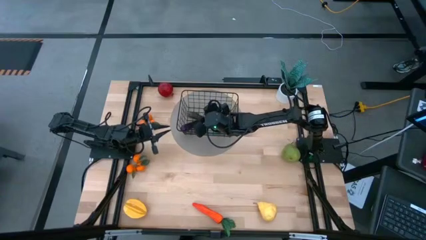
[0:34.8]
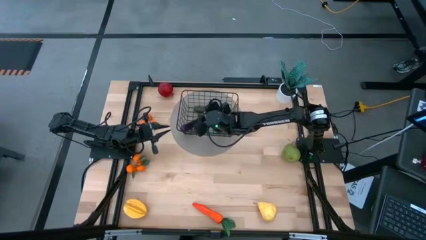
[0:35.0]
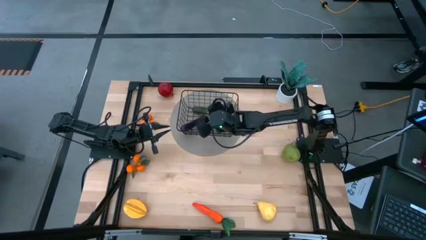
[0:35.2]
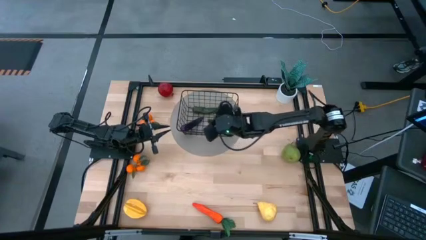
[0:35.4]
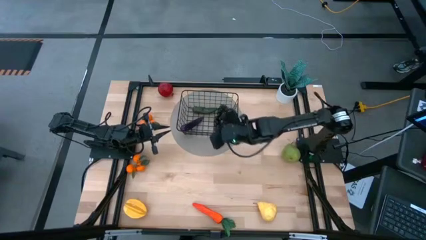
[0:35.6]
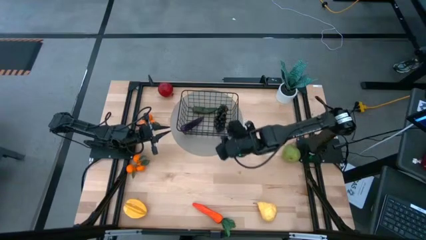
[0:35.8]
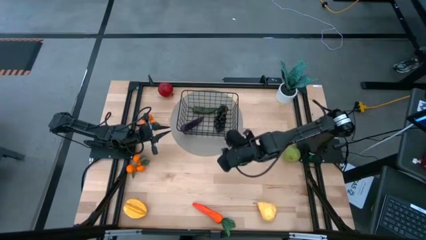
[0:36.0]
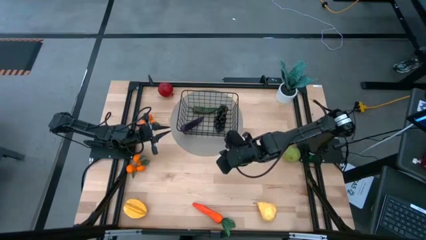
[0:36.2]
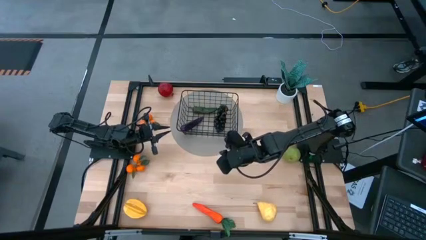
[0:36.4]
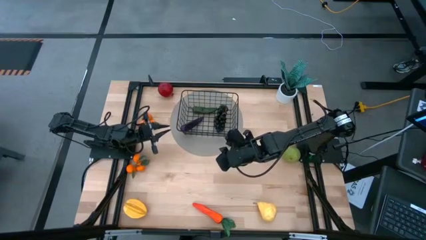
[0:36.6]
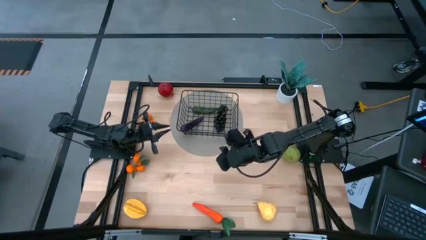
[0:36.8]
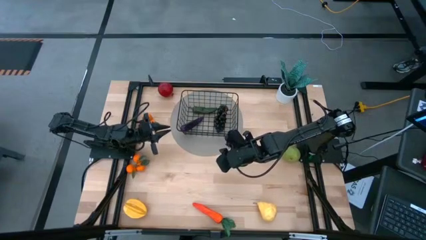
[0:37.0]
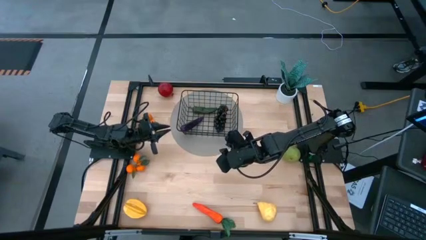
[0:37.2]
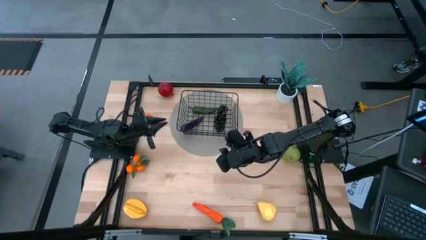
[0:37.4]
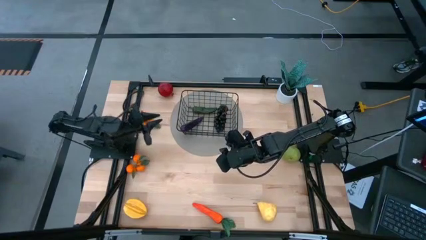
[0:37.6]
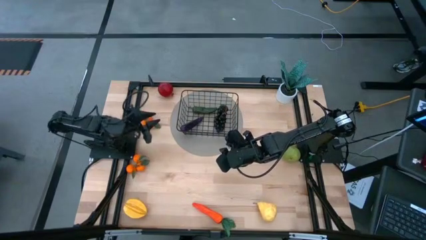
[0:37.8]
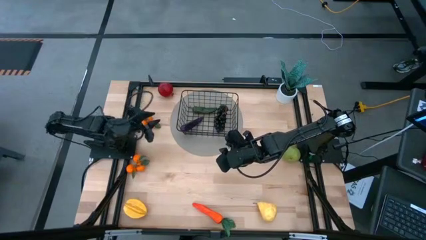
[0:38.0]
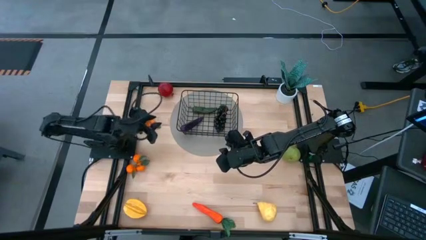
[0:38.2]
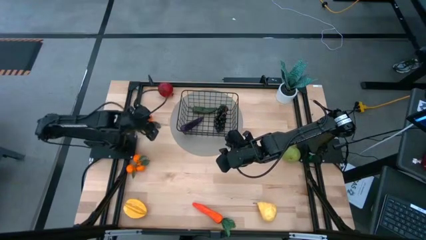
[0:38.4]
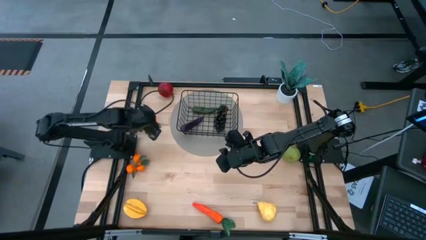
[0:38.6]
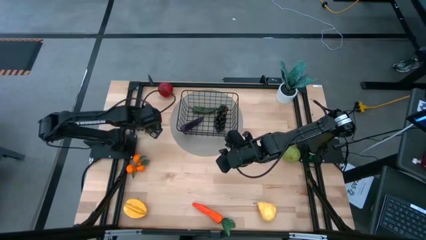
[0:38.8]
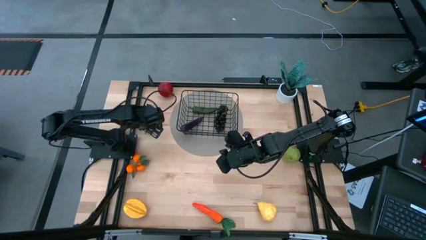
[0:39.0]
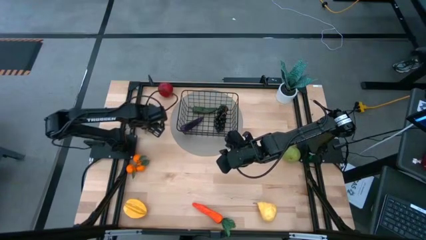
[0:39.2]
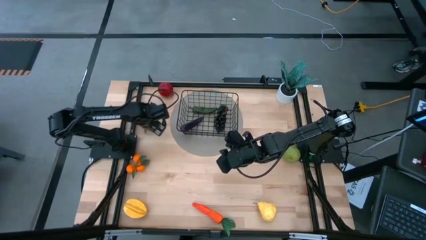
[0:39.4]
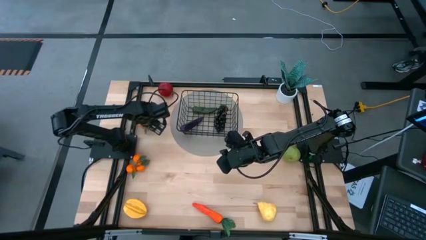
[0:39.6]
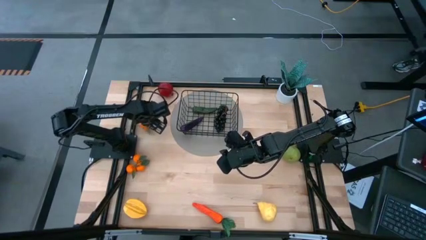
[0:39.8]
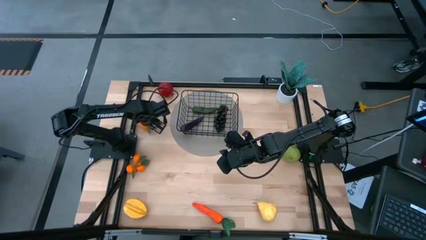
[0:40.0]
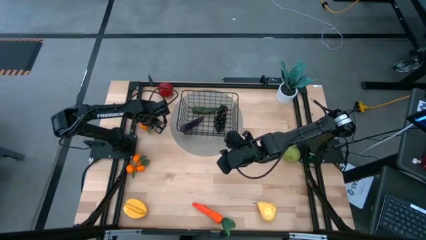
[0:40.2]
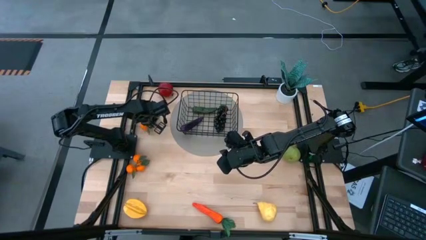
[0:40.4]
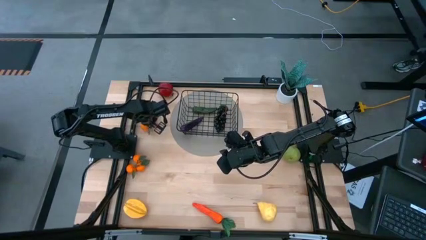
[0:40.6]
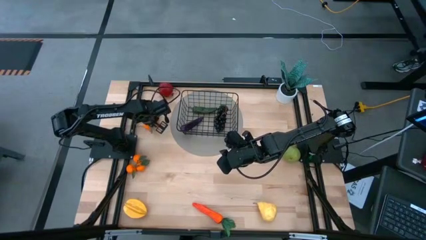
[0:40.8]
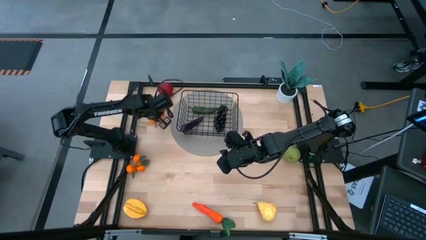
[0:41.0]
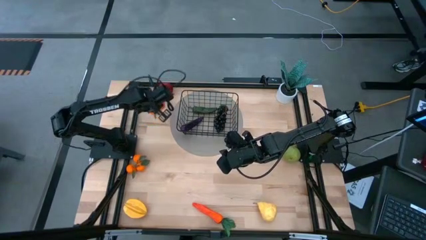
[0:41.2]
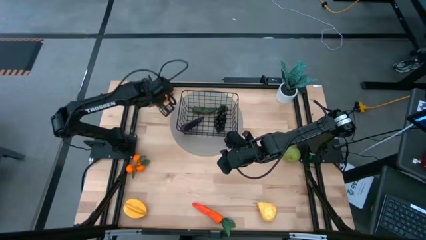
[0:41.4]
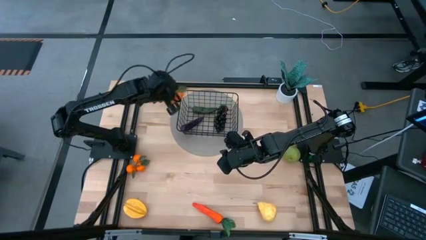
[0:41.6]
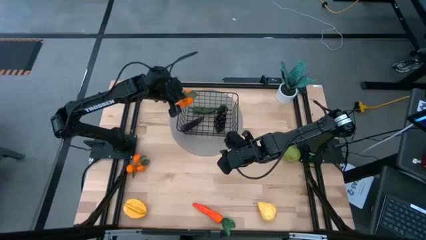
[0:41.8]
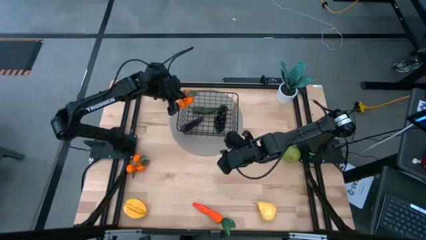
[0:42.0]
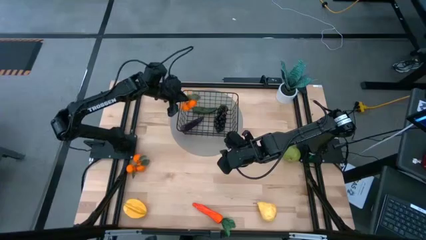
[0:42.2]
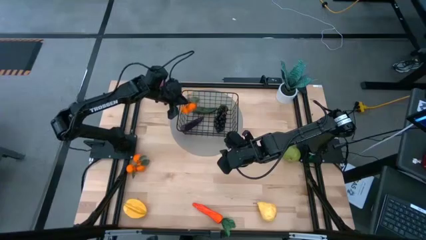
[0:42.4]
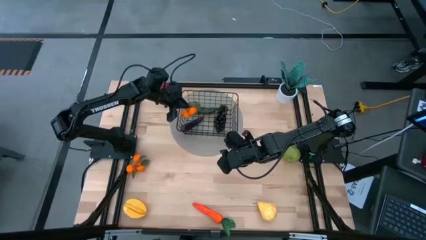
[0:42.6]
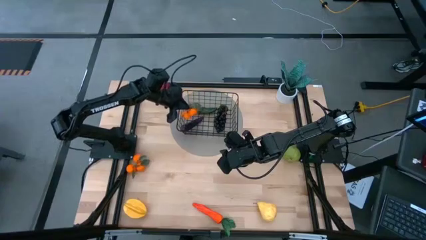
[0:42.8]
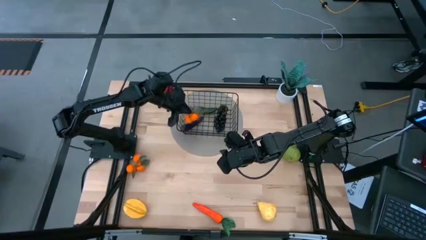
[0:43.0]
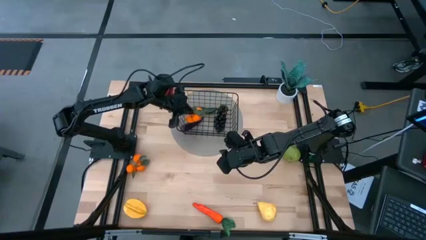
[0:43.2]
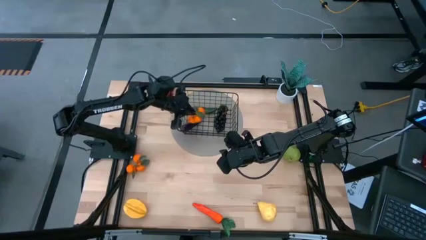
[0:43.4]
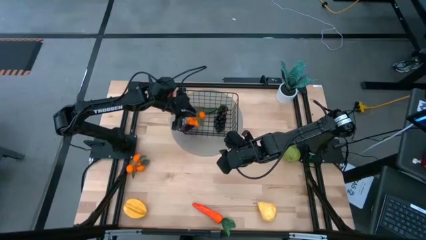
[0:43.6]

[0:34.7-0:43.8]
Task: Build produce basket
Put the orange tangerines into the black wire basket

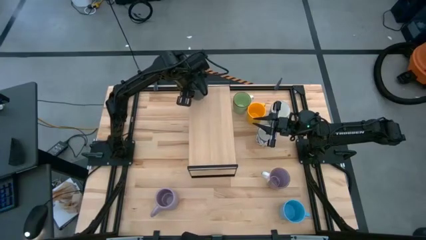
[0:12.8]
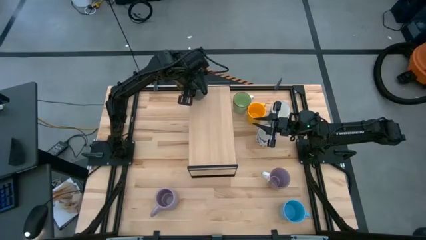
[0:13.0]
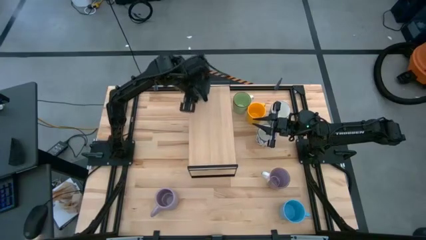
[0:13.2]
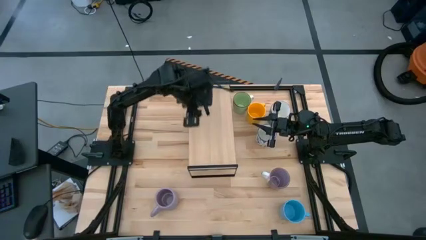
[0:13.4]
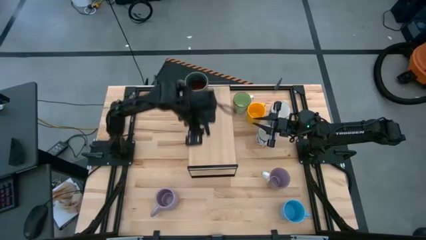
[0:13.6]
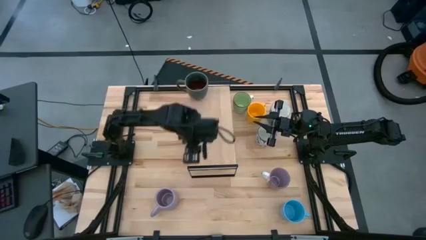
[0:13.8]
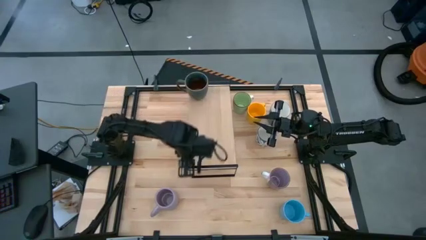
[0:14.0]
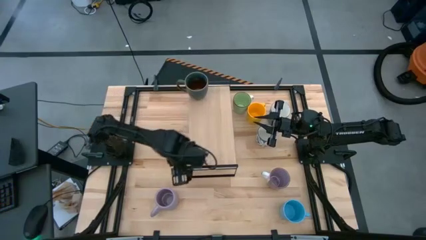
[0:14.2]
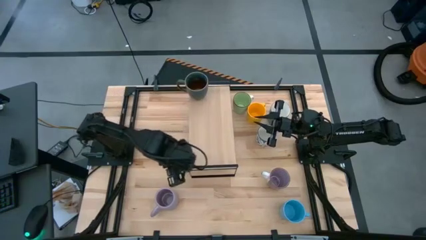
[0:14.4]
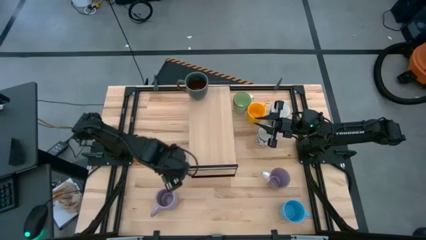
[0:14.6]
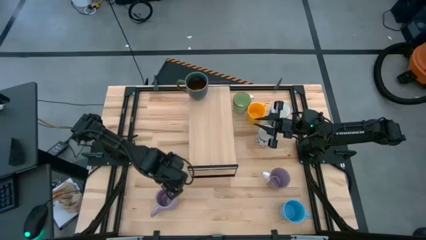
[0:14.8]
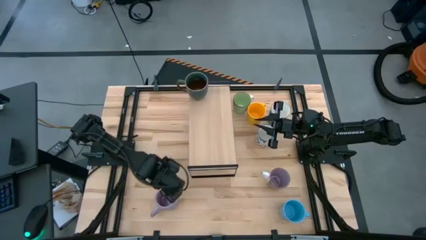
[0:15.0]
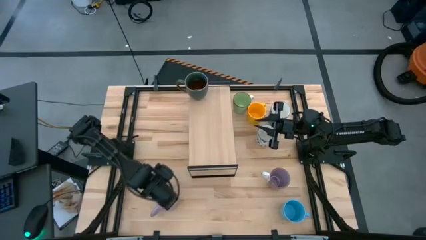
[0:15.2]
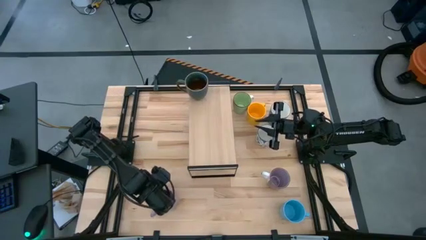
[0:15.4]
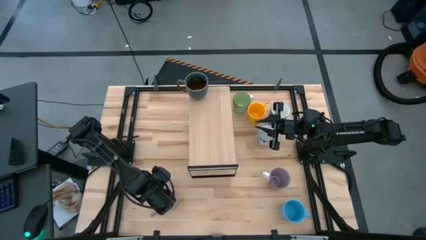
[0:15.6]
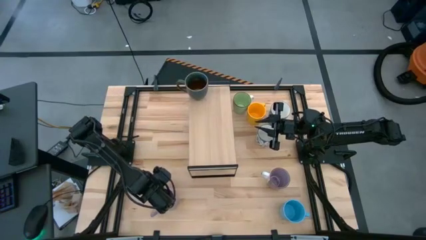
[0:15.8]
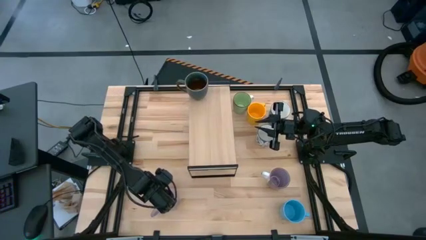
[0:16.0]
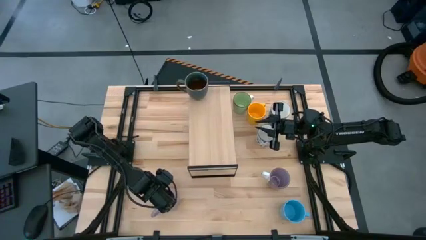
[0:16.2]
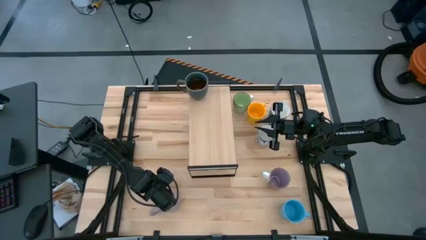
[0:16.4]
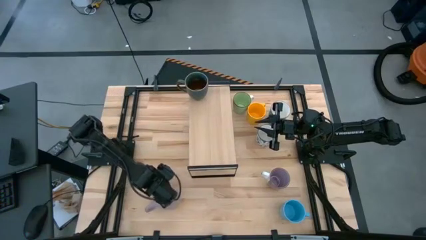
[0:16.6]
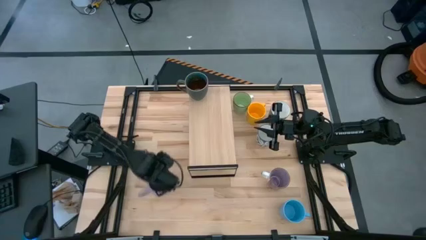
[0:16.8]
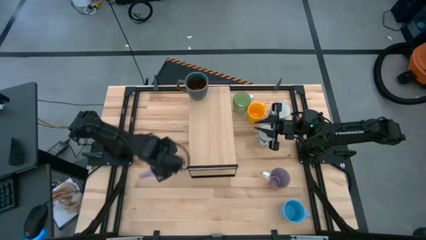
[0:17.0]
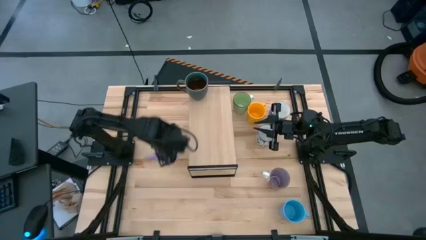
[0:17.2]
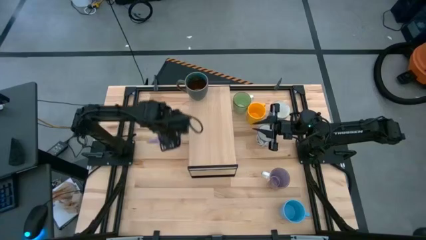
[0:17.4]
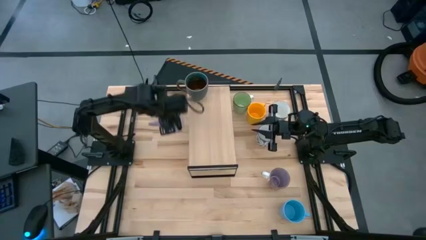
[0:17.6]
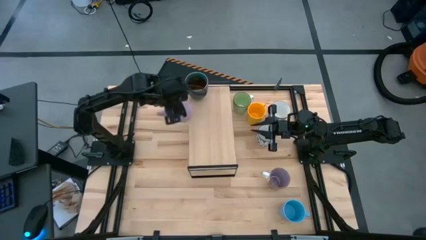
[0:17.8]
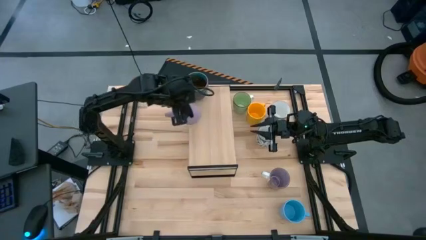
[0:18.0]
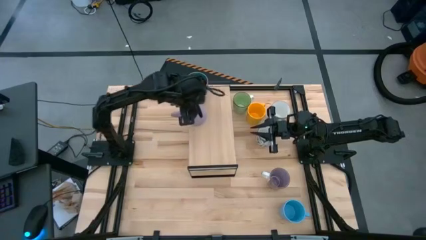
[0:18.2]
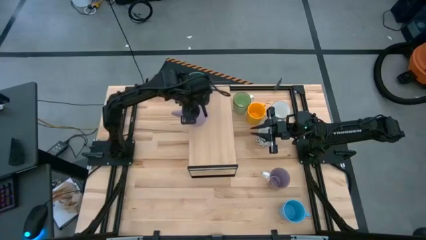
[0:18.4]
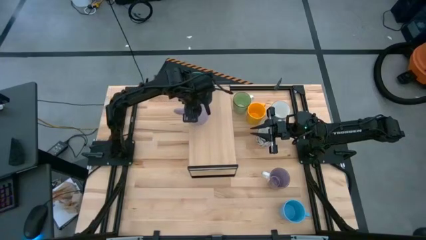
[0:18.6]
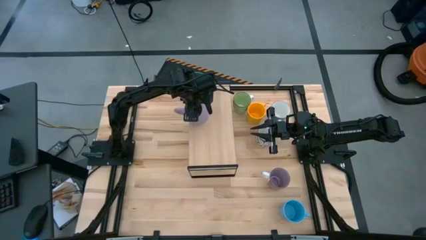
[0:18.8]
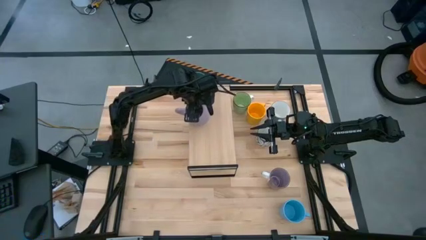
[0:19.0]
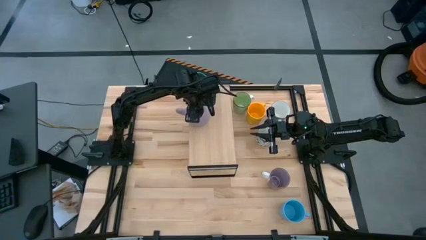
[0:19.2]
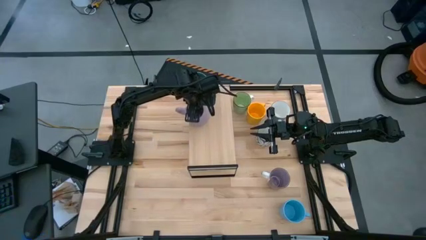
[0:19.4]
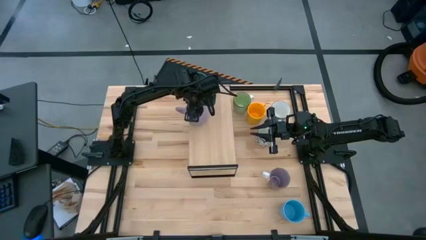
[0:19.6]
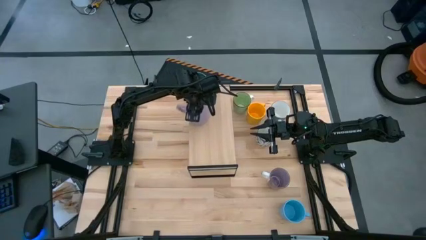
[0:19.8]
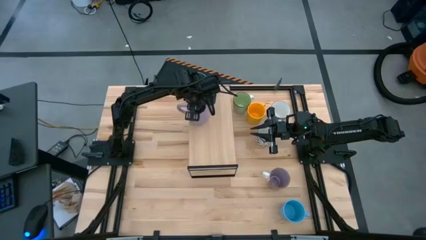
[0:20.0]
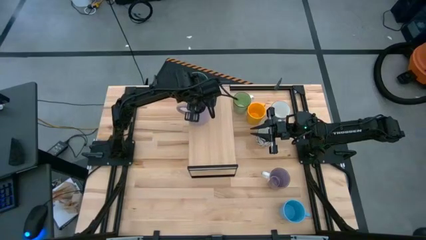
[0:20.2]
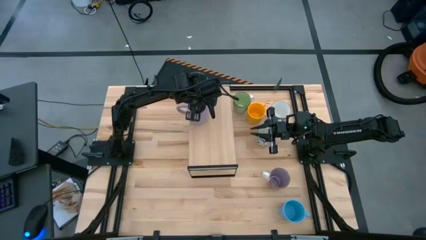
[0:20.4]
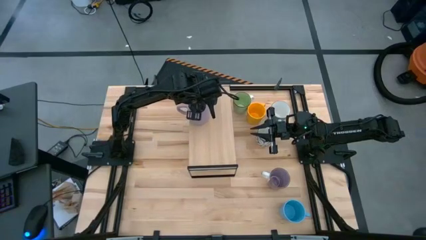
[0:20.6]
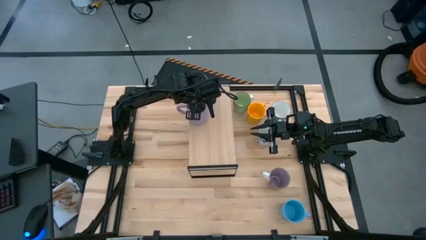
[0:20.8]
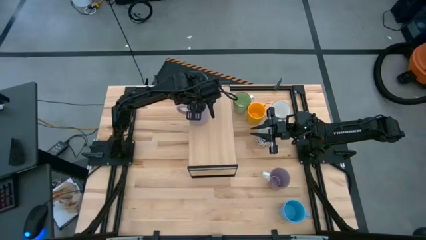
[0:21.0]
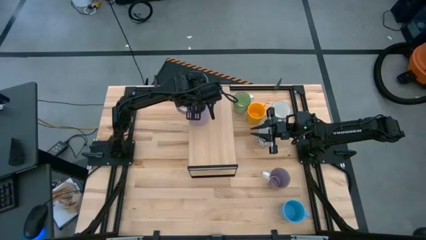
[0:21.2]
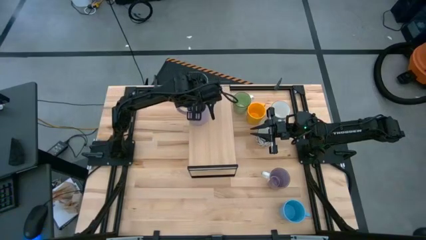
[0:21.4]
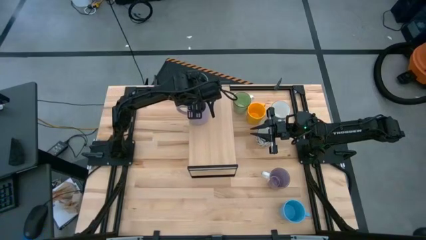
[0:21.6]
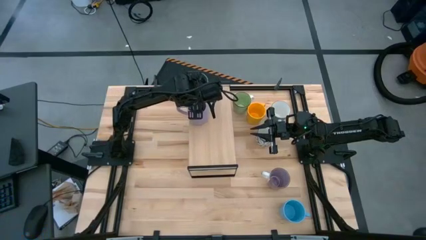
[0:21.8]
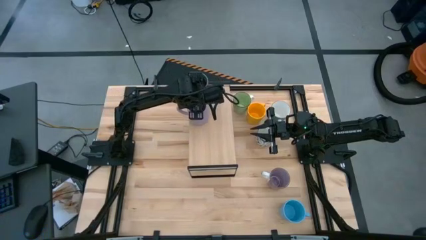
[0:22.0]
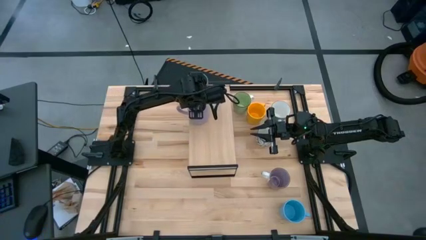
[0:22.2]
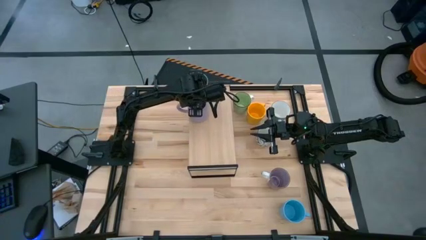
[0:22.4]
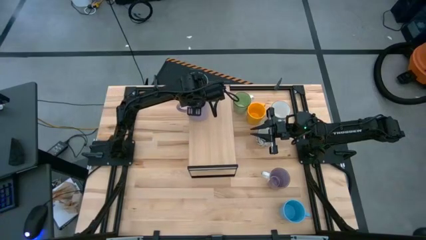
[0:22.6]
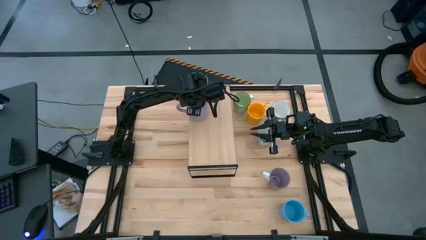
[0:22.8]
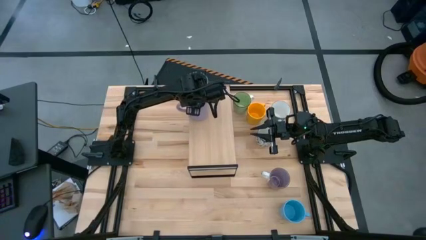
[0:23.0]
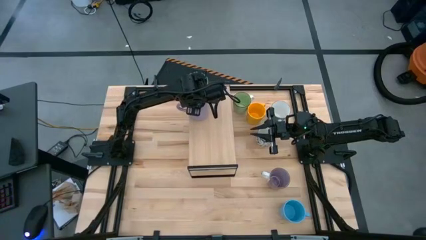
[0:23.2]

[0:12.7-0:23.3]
Task: Place coffee mugs
Put the purple mug on the shelf
